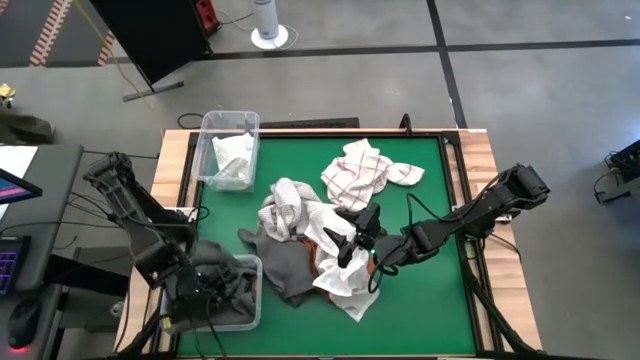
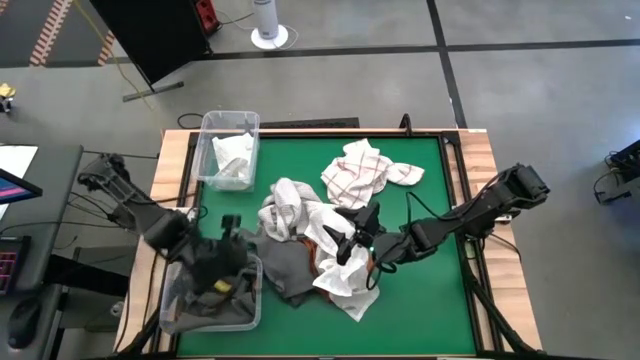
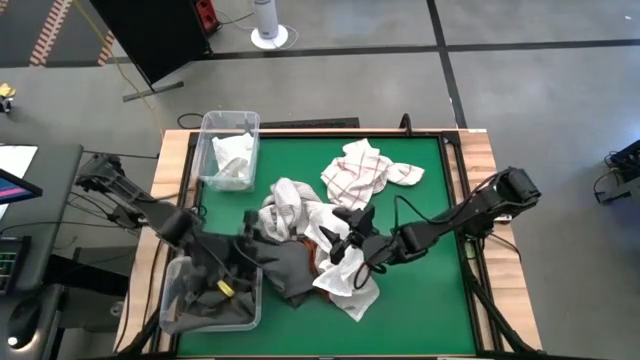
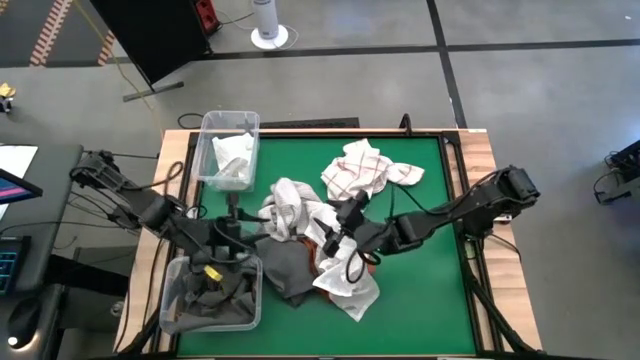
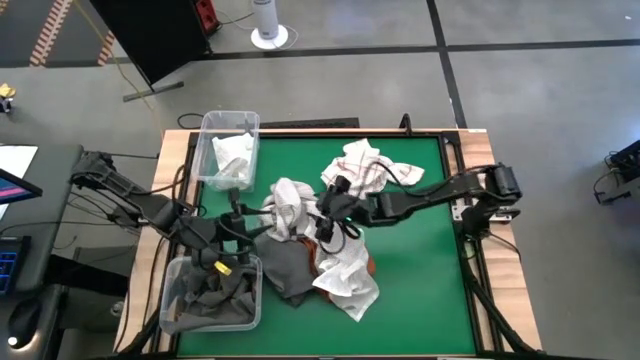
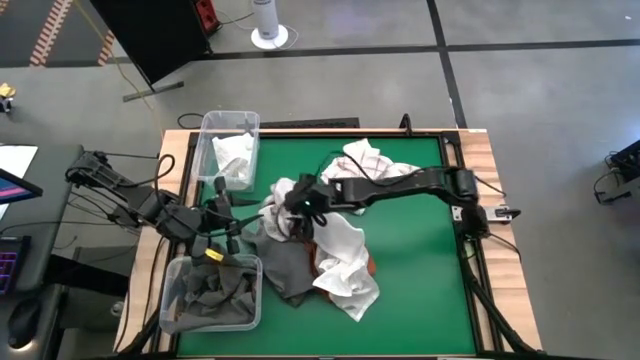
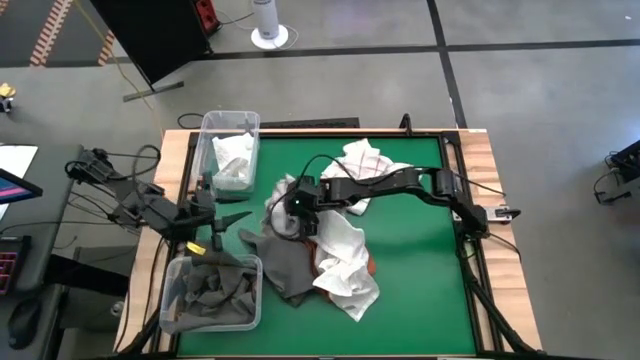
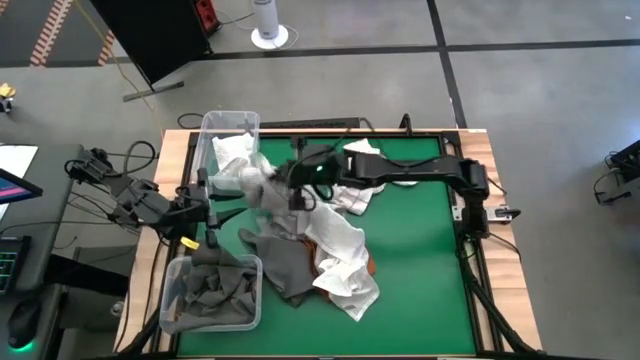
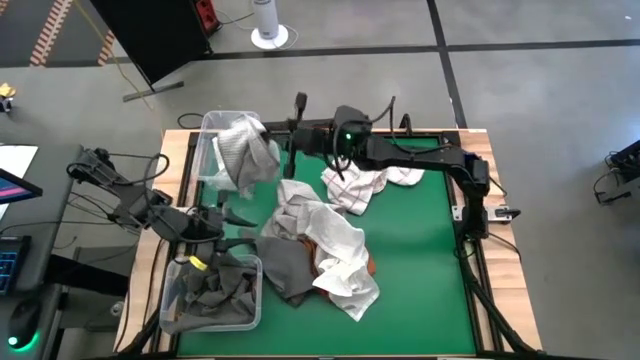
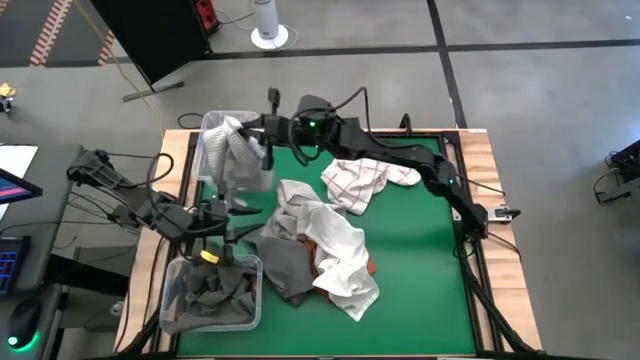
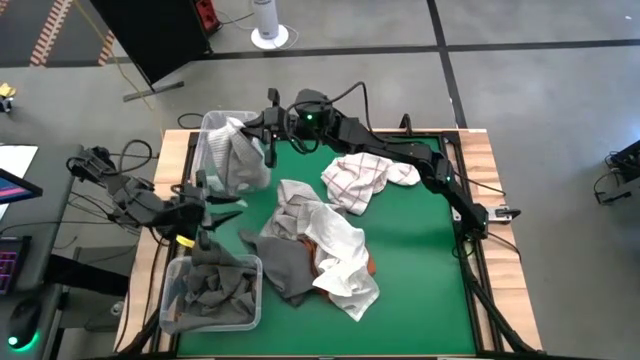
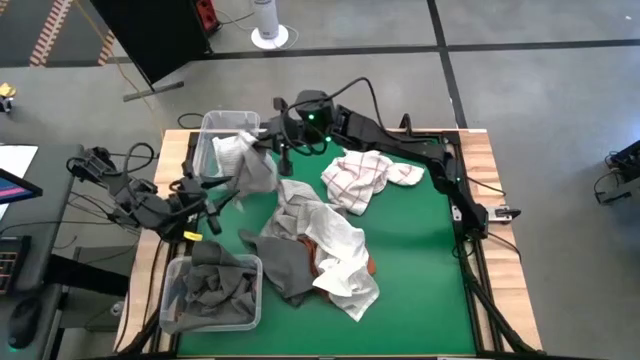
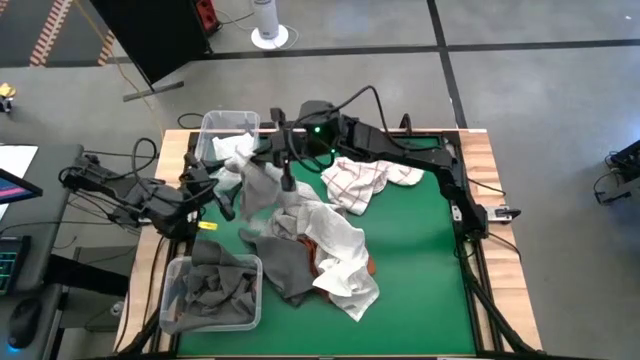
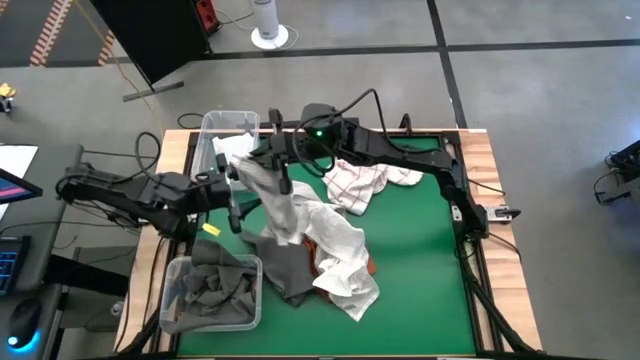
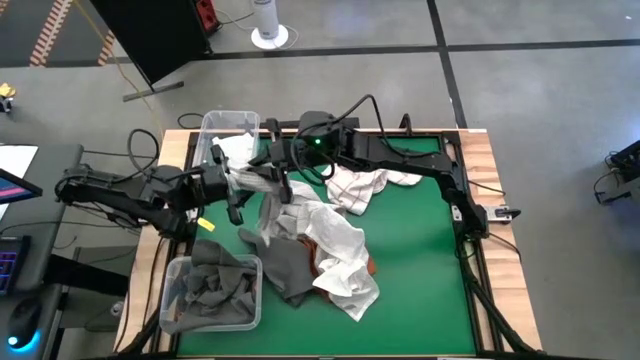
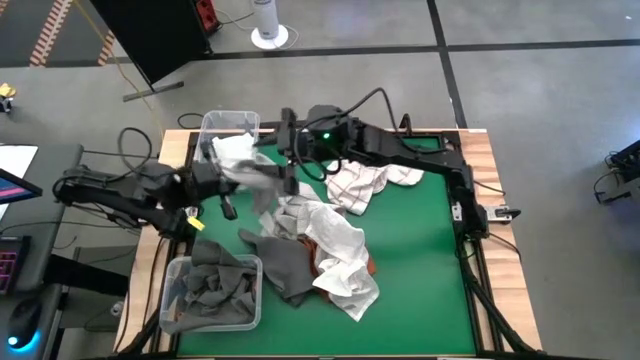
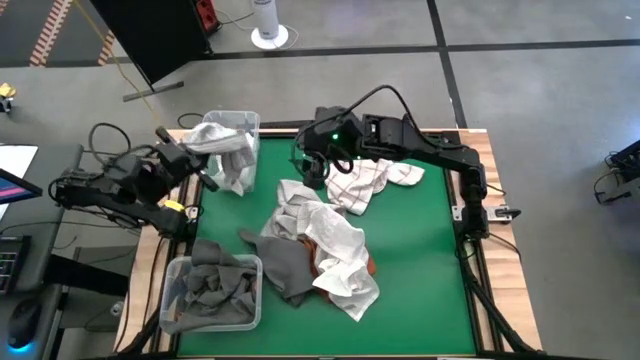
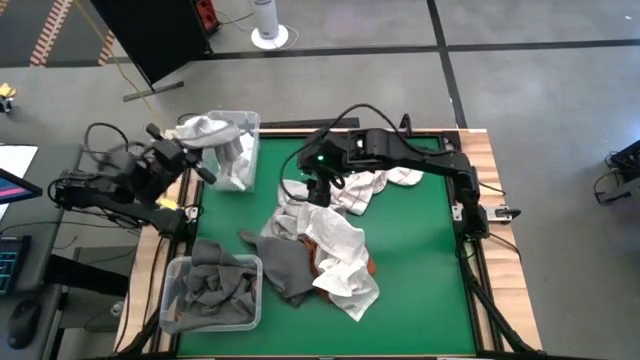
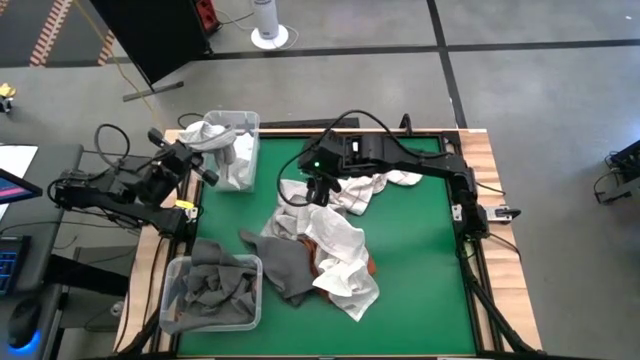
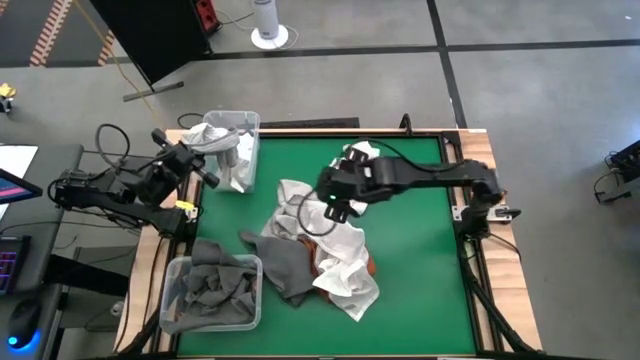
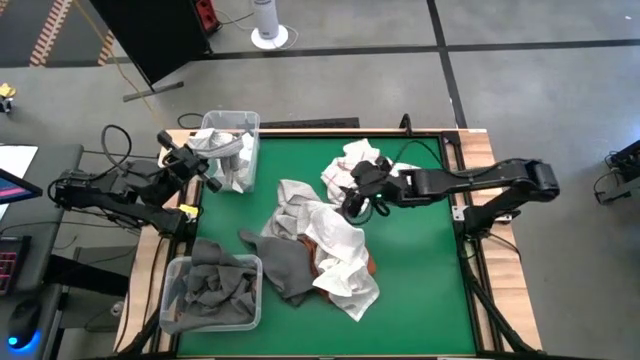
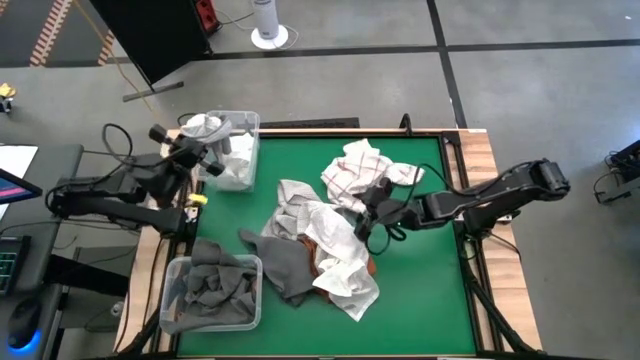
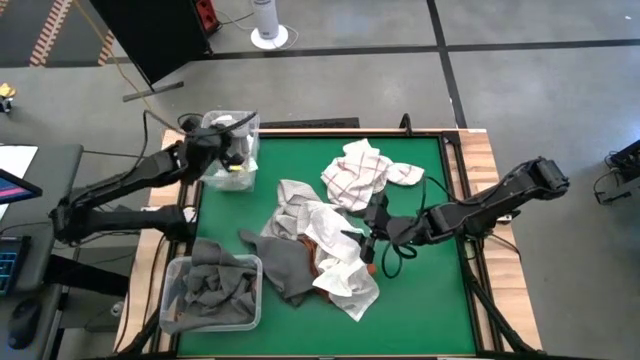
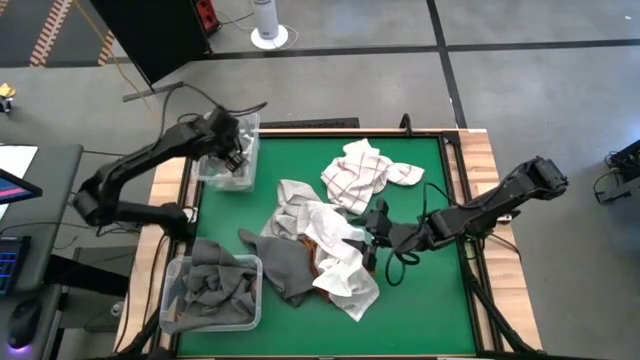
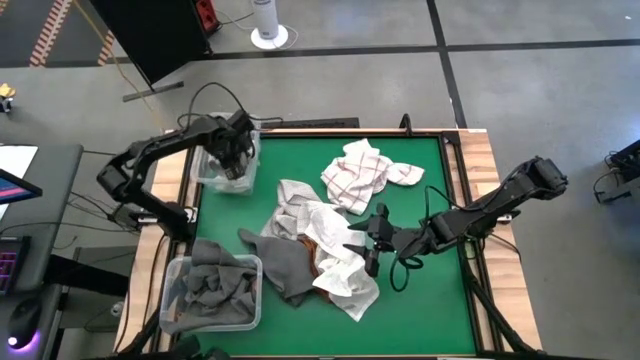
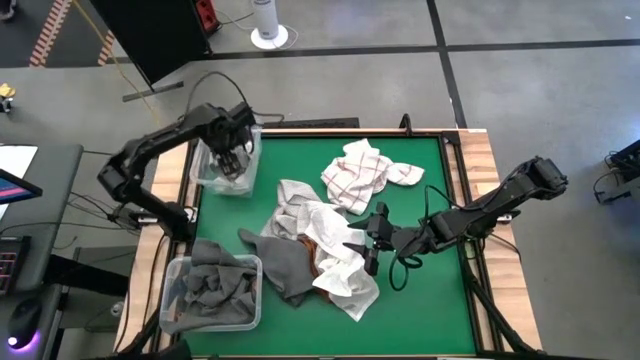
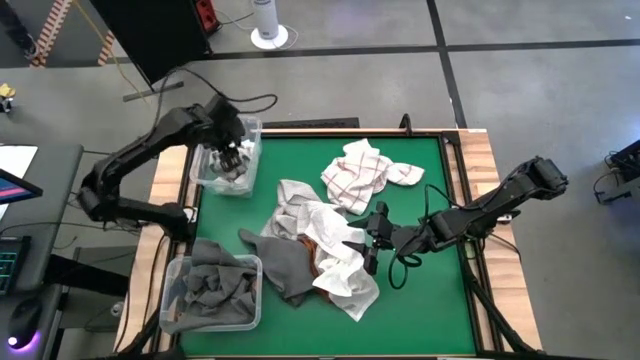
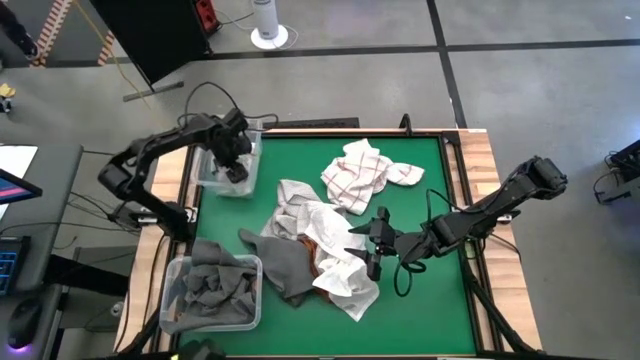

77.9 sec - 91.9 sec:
Task: Sort towels by color in basket
Put the dark white towel into the top transparent bin

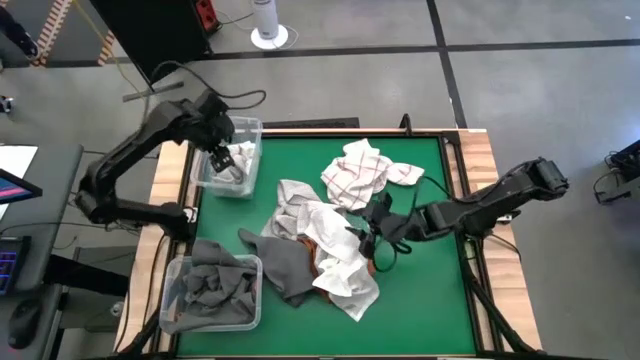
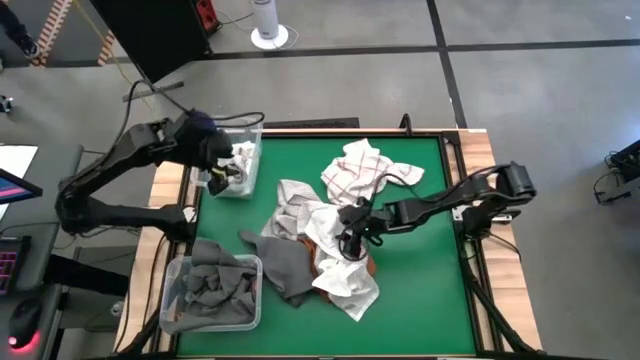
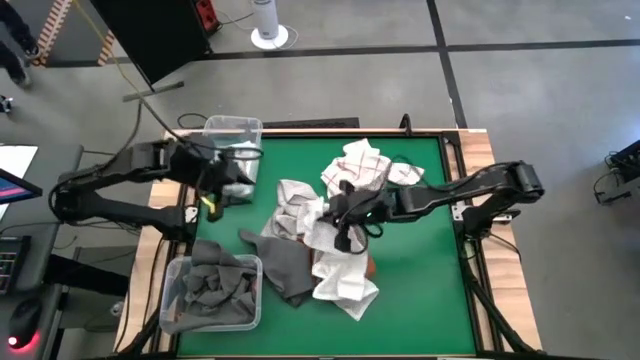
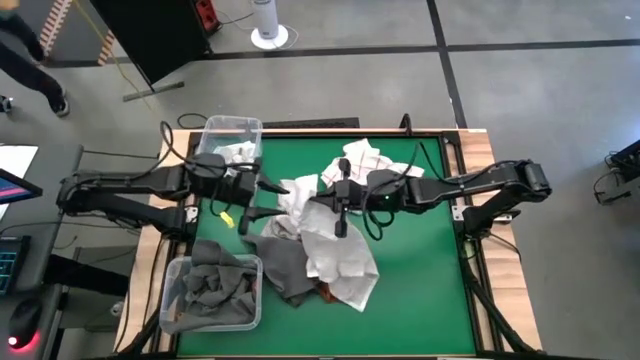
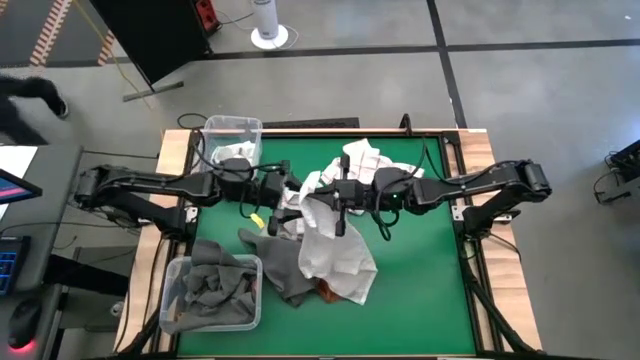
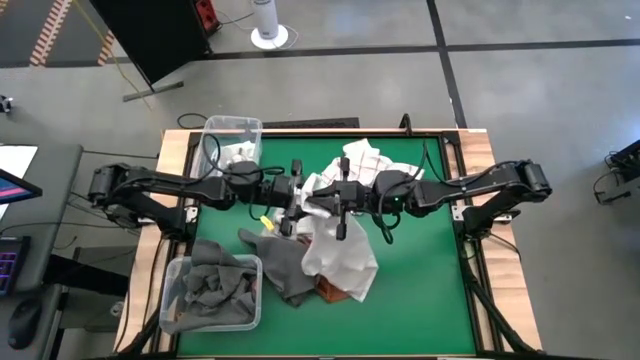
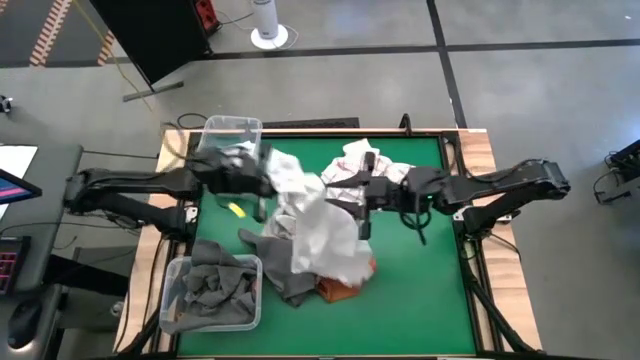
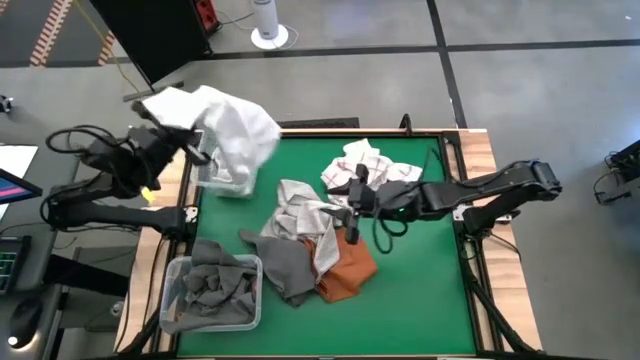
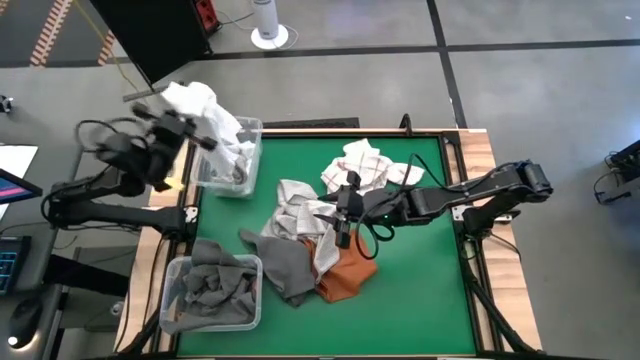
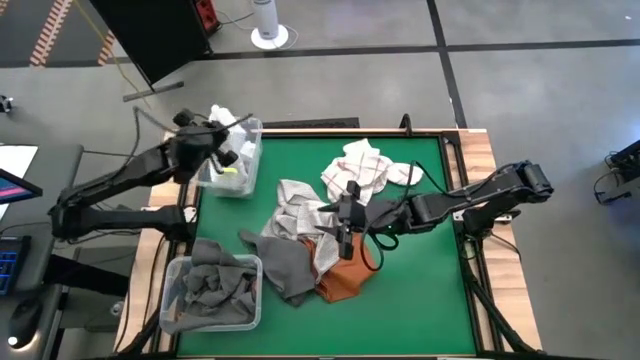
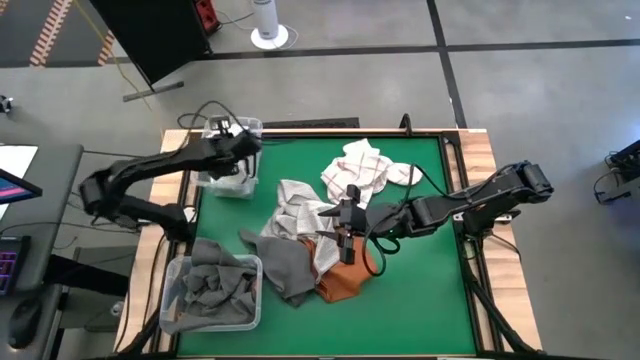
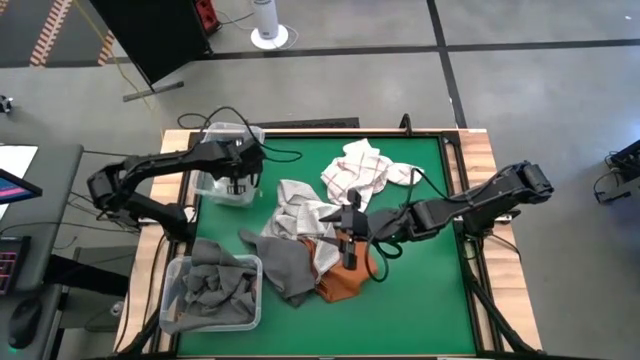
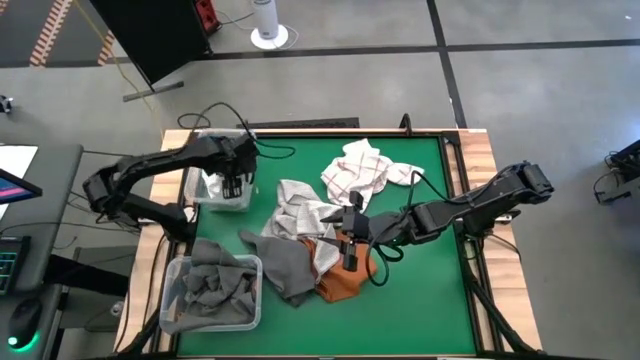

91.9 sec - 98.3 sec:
Put the white towel into the top transparent bin

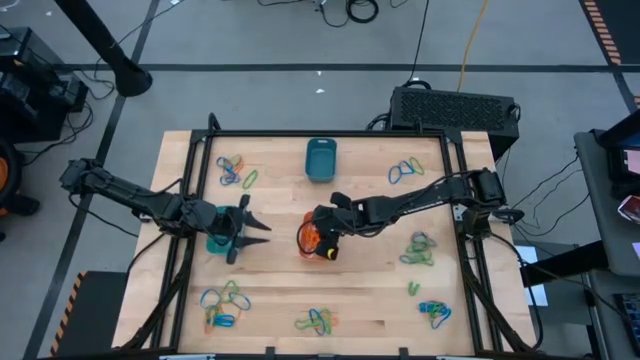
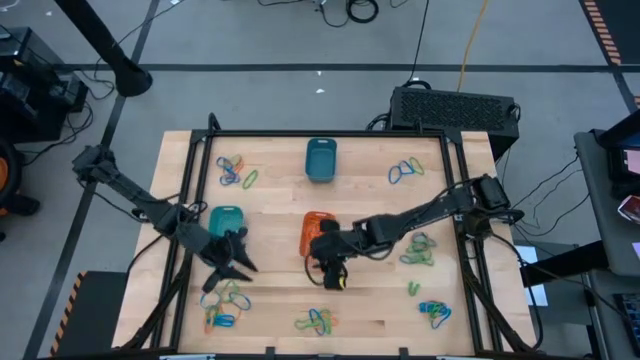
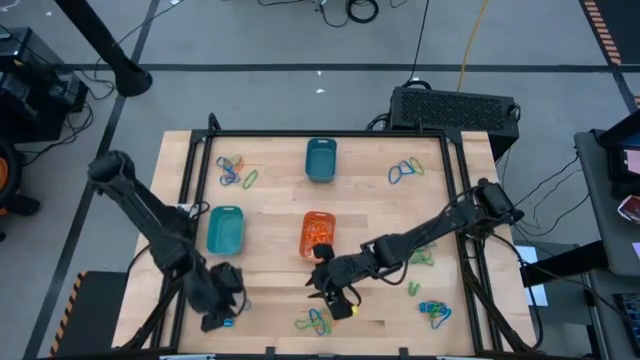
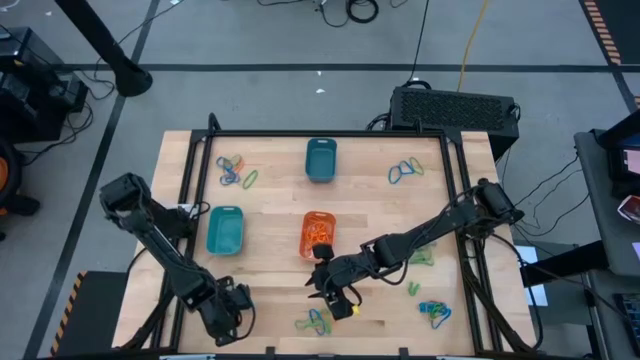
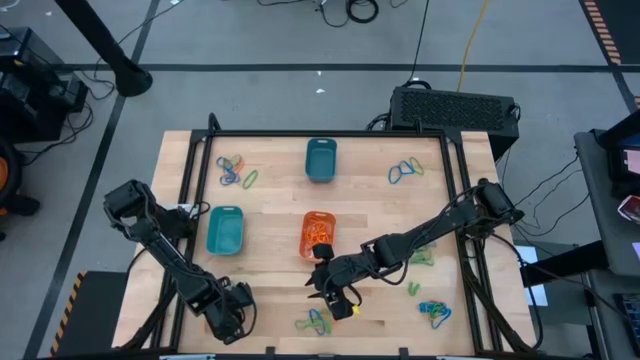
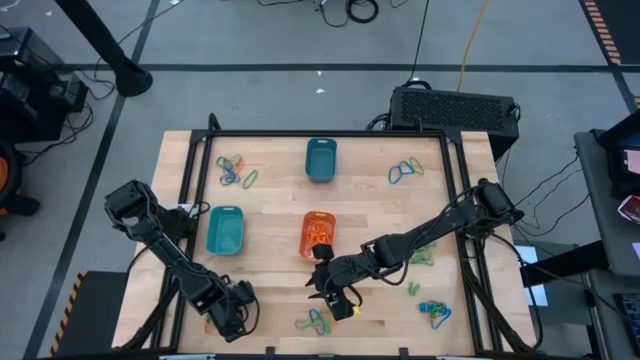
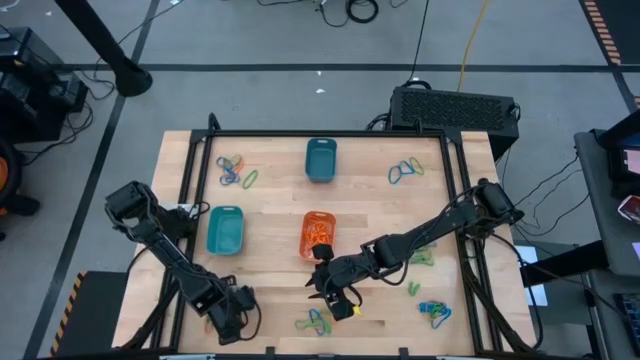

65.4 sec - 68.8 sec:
Task: Sort rubber bands into baskets
Put the orange rubber band into the orange bin
